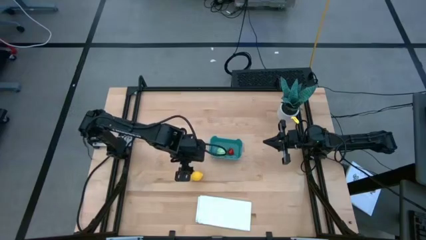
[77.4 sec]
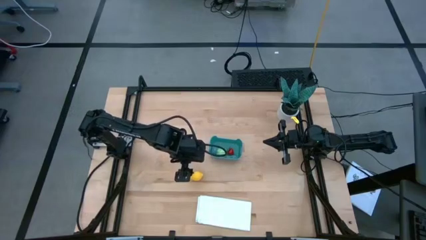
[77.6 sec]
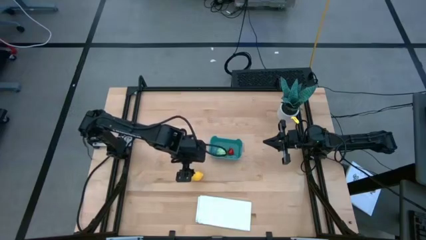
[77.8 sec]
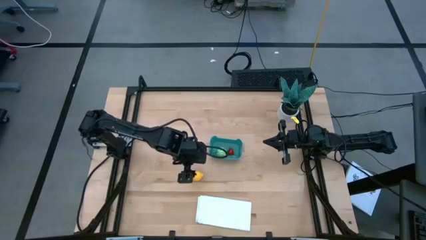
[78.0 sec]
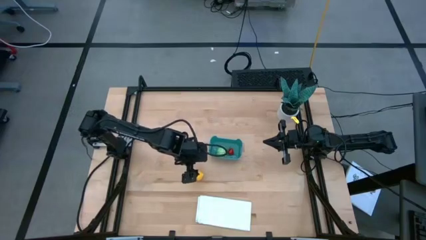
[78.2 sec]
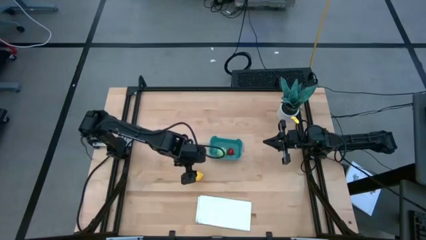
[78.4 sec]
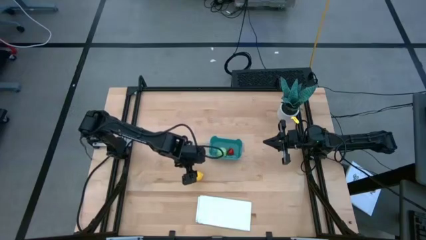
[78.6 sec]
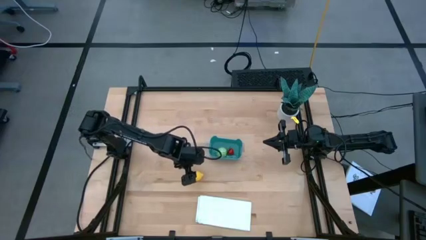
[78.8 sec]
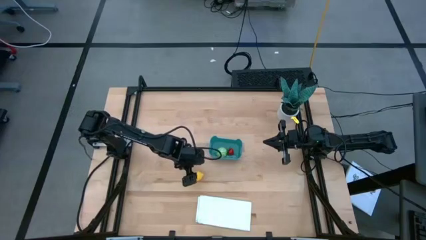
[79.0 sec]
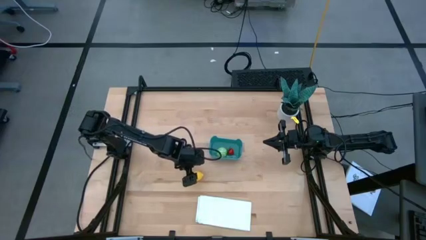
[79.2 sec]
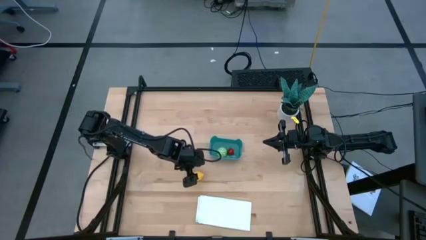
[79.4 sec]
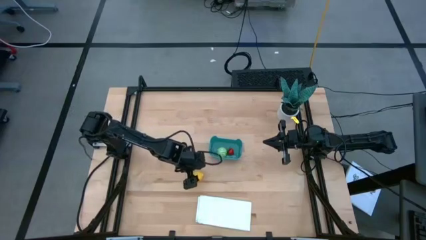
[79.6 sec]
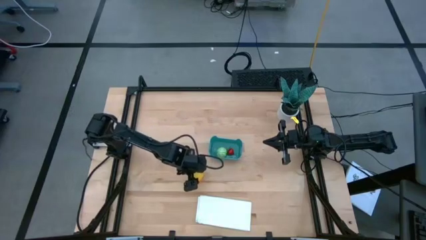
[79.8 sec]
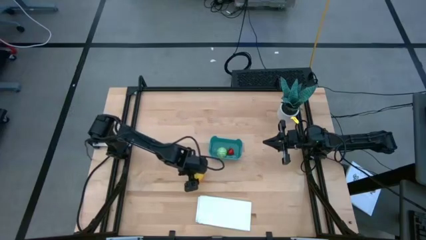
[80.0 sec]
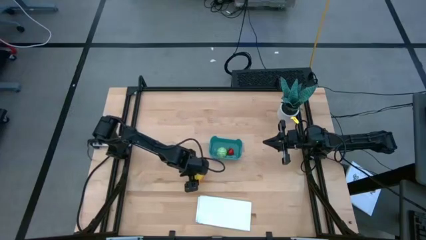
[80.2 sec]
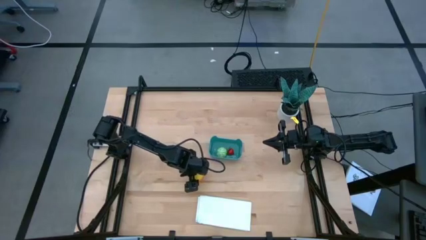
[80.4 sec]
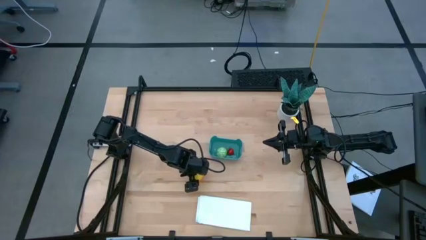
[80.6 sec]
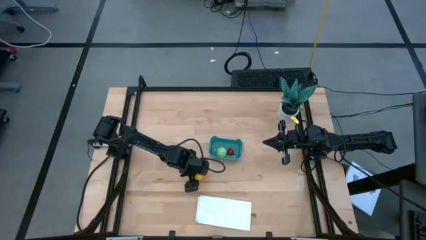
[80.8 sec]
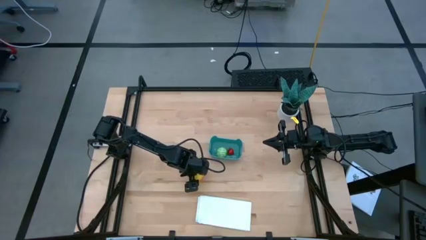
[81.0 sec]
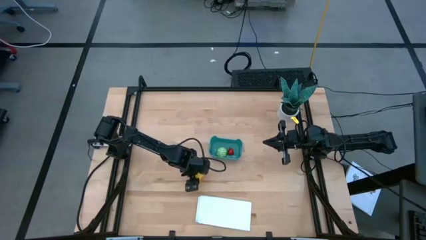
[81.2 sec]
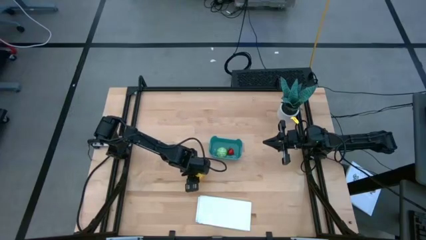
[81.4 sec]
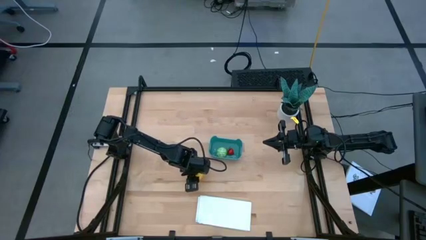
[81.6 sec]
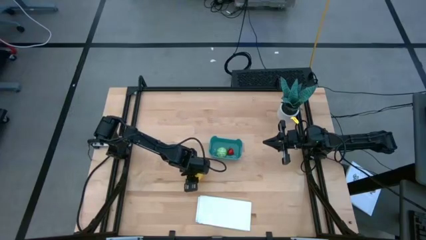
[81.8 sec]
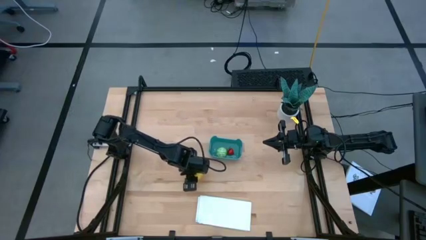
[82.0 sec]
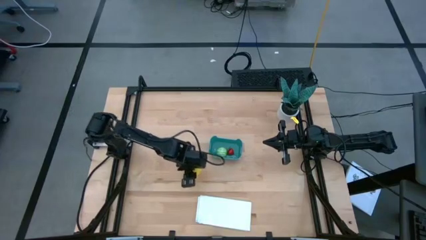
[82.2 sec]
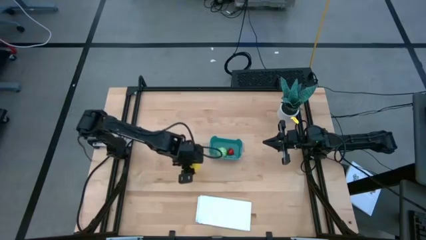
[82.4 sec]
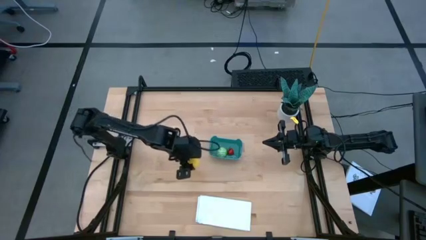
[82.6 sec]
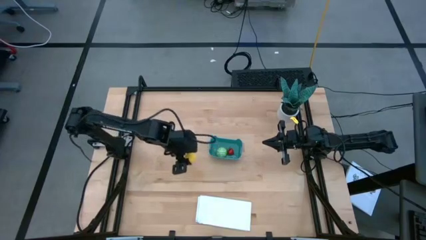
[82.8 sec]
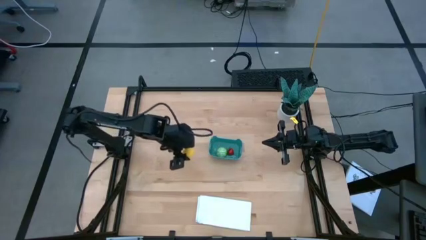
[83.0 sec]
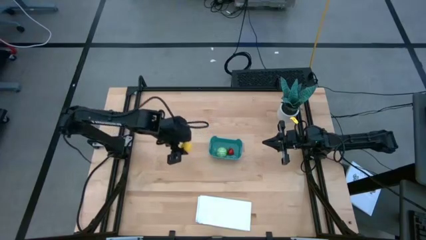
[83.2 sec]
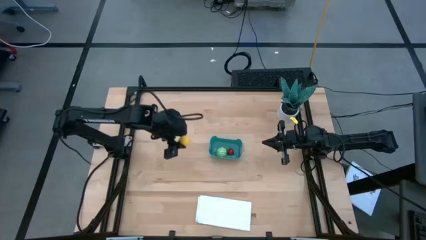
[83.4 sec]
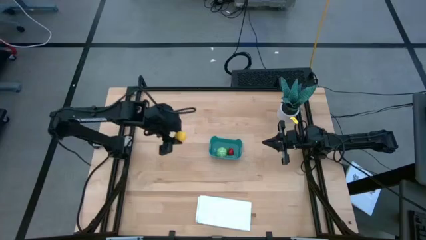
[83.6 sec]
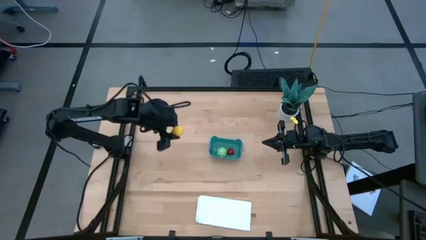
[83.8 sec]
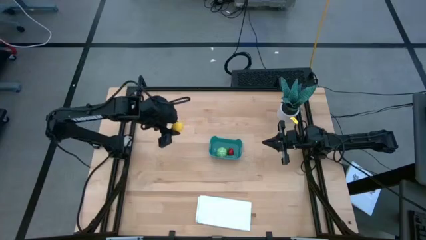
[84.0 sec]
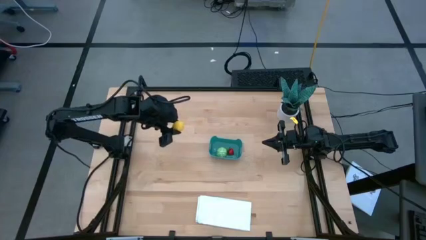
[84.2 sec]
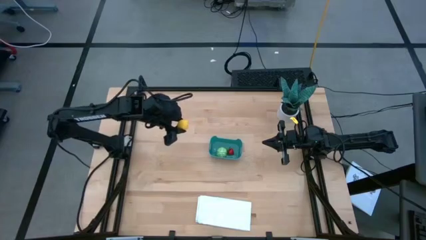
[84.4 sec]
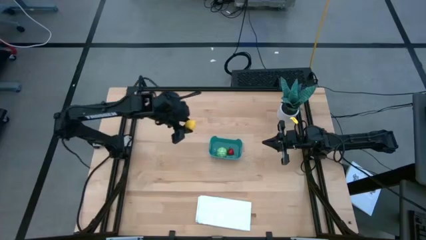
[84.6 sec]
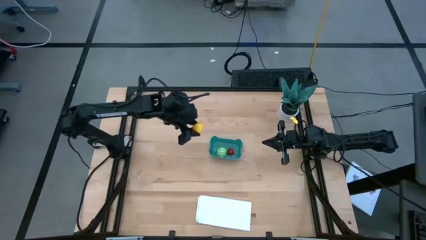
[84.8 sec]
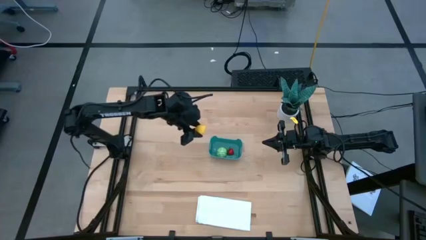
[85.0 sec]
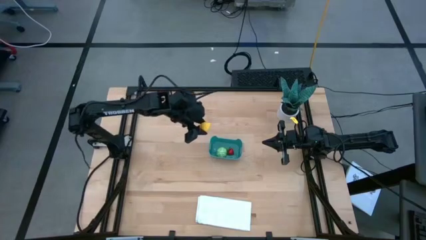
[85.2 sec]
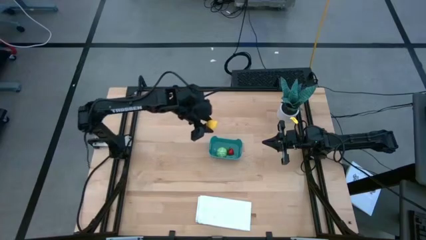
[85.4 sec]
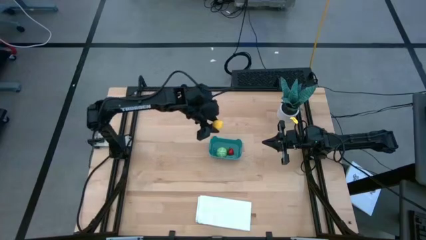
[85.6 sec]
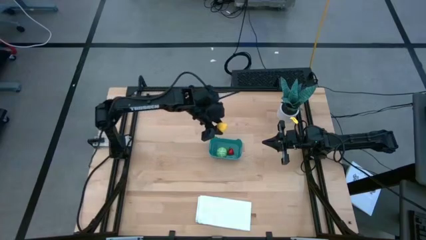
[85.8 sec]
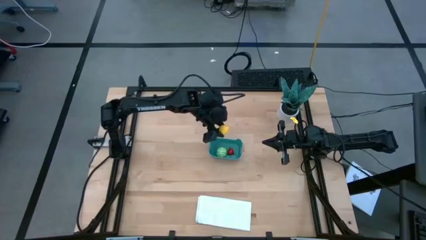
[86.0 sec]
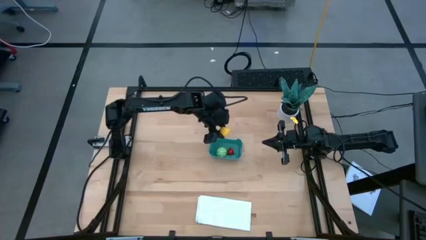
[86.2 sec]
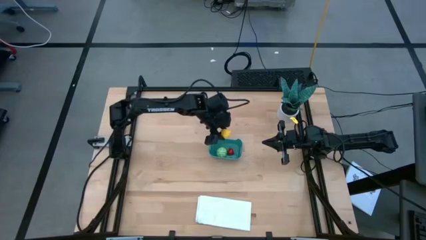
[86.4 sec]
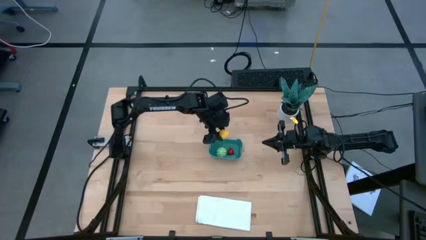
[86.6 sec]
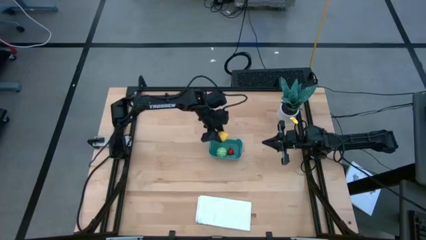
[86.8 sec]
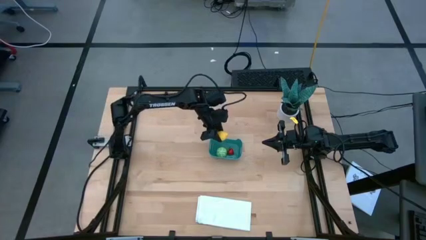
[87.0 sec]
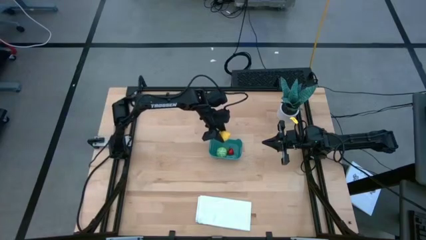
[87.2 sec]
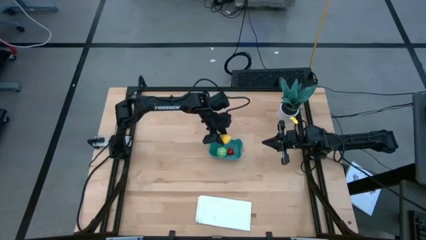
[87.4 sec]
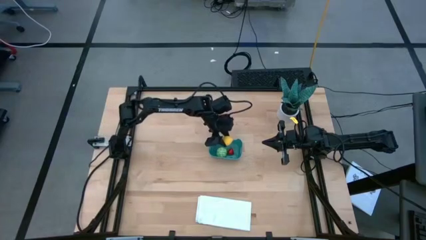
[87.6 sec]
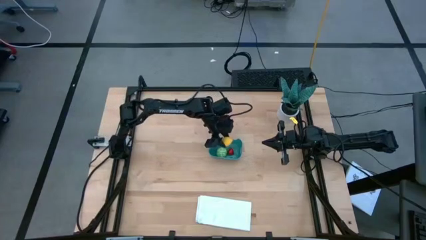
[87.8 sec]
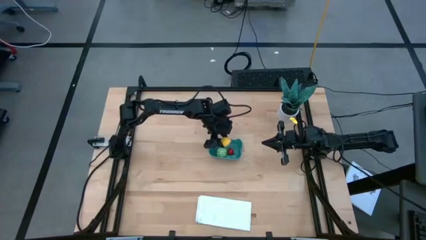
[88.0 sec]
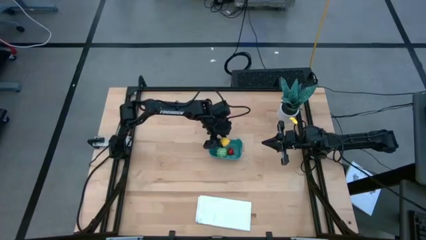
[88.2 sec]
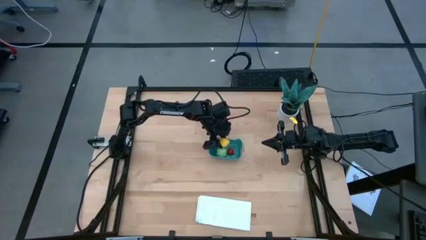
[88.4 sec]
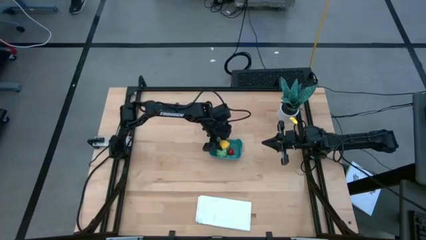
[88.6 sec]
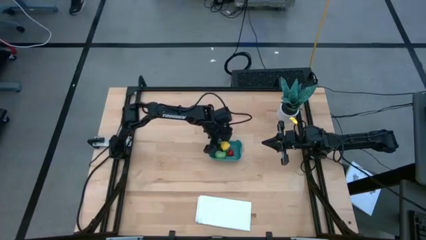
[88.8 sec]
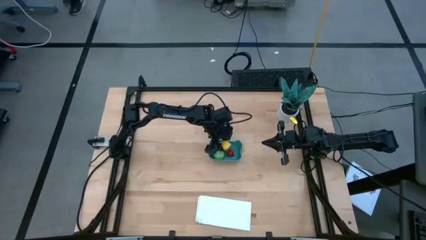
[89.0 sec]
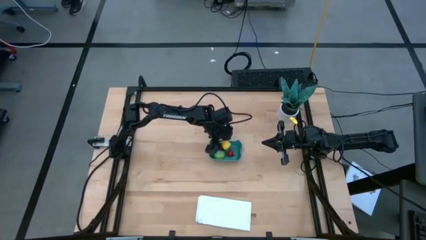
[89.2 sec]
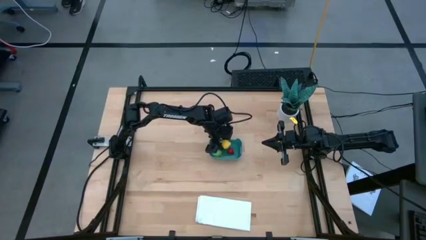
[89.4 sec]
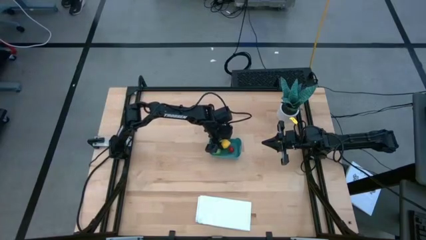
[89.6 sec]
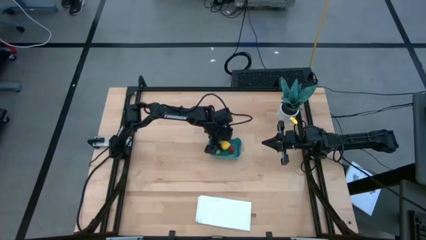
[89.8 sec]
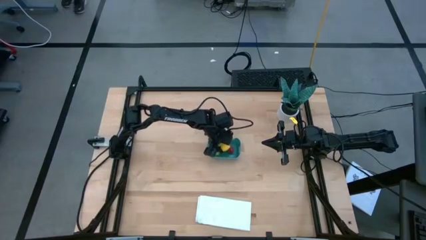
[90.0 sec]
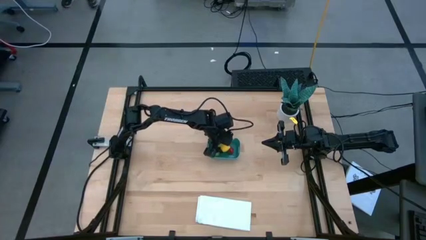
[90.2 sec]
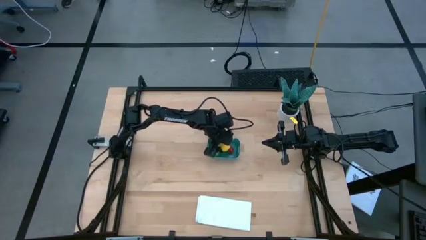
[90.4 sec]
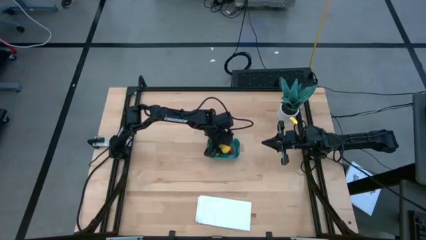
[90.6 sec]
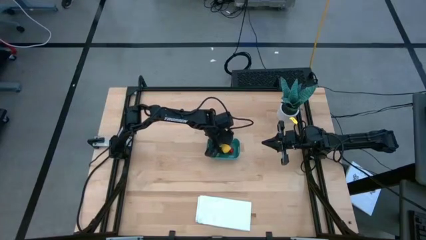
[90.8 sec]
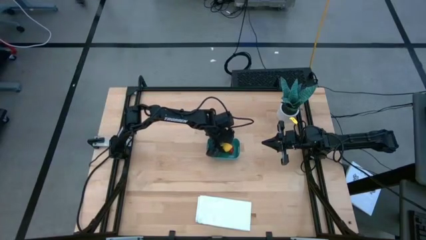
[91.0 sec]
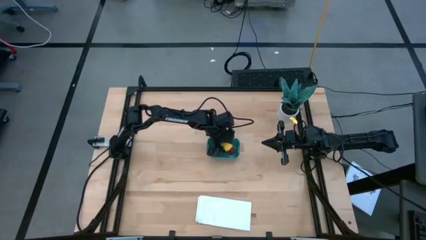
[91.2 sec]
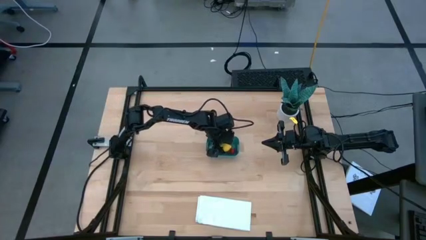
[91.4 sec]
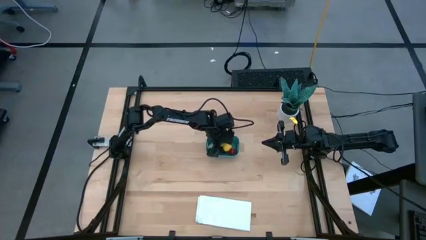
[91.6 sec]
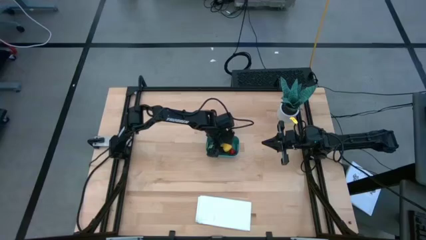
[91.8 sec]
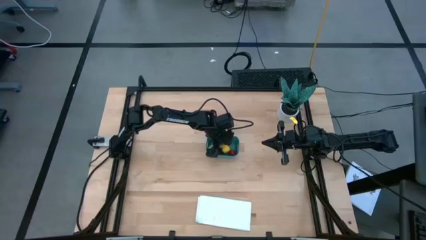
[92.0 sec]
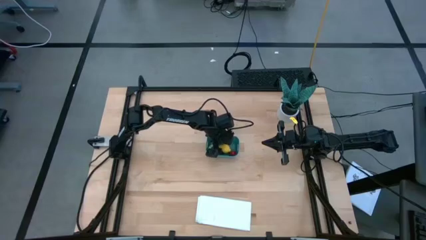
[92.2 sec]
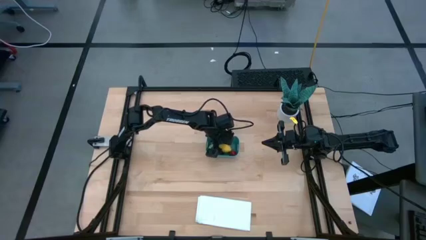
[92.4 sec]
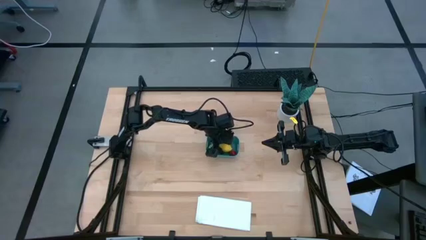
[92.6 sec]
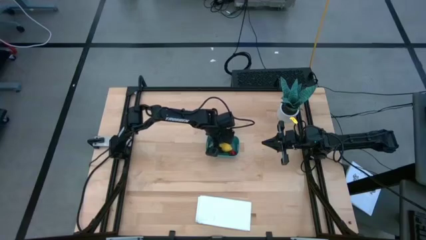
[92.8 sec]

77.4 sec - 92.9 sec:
Task: Pick and placing Produce into tupperware
Put the yellow lemon into the blue bin
